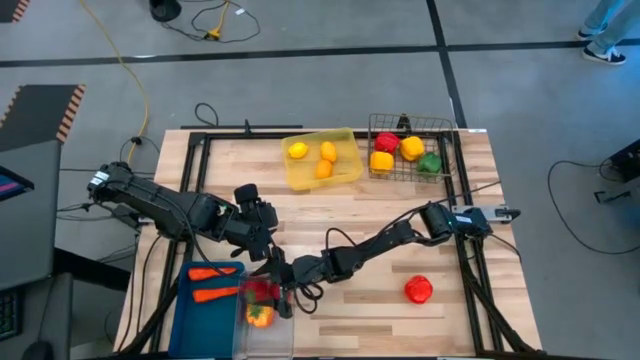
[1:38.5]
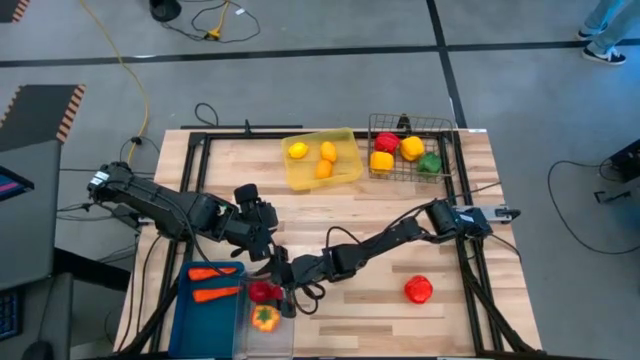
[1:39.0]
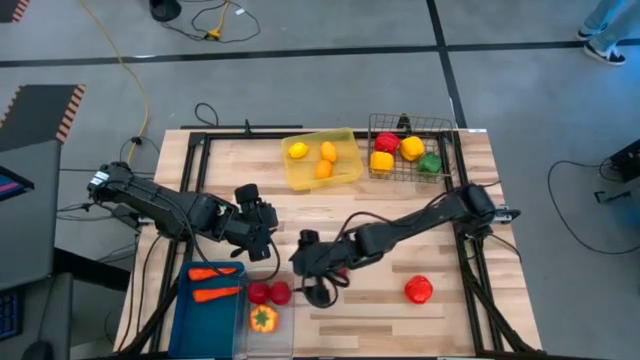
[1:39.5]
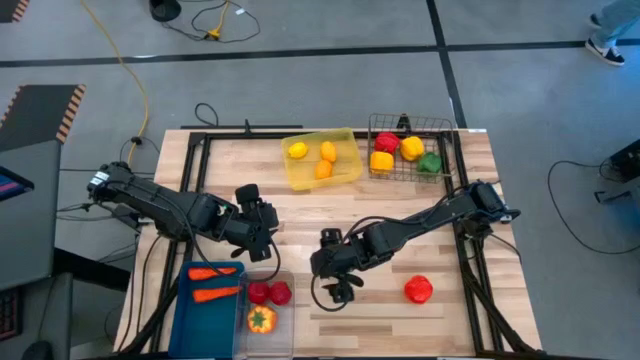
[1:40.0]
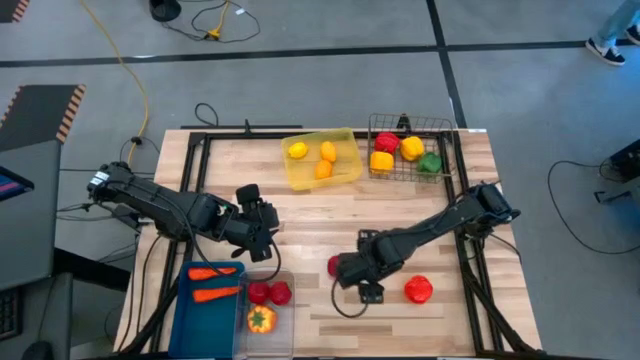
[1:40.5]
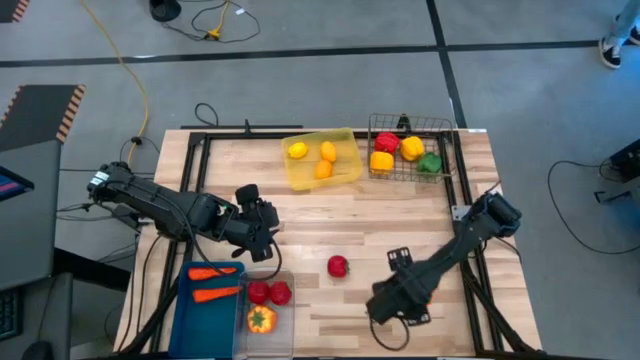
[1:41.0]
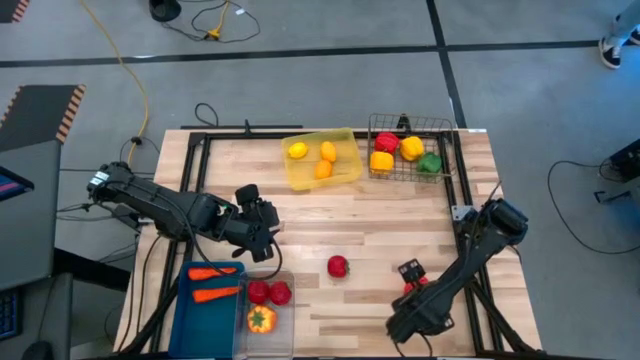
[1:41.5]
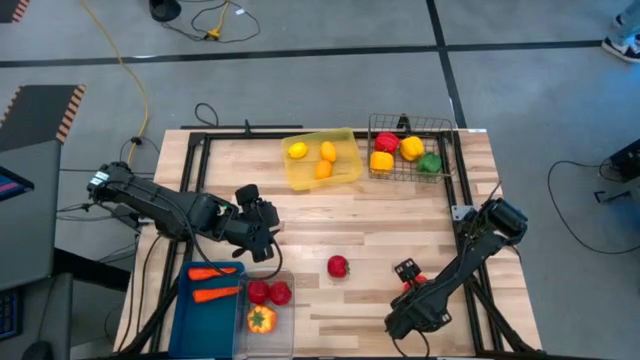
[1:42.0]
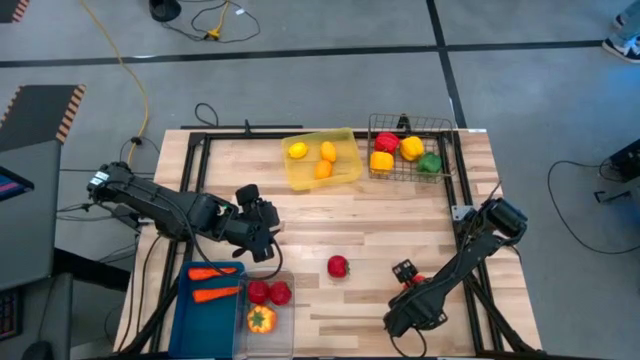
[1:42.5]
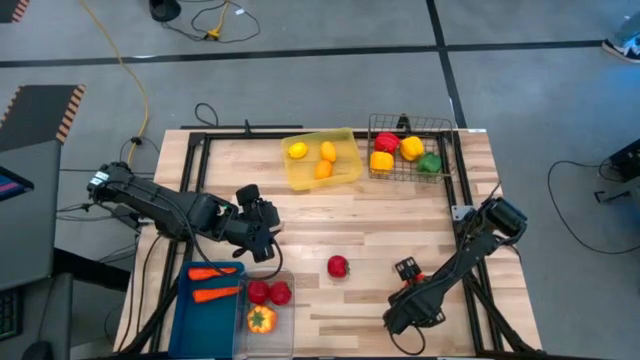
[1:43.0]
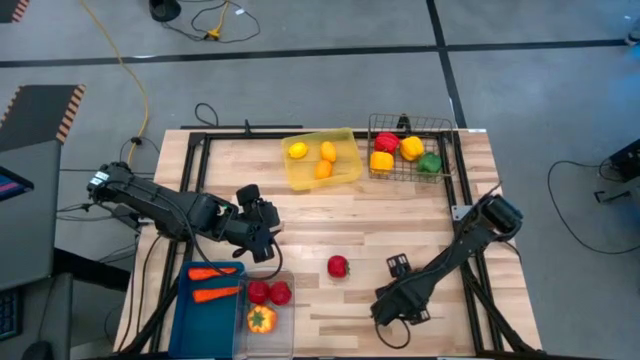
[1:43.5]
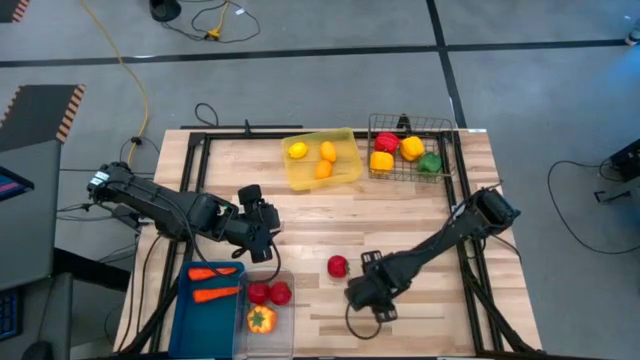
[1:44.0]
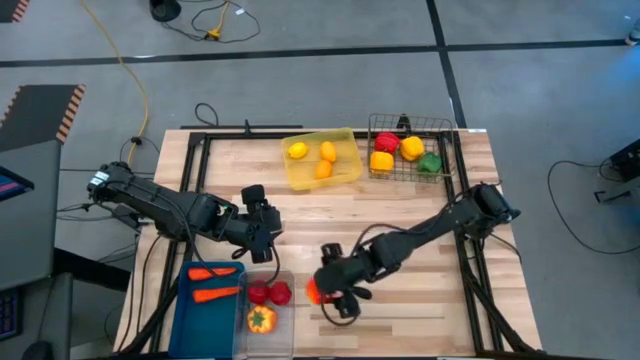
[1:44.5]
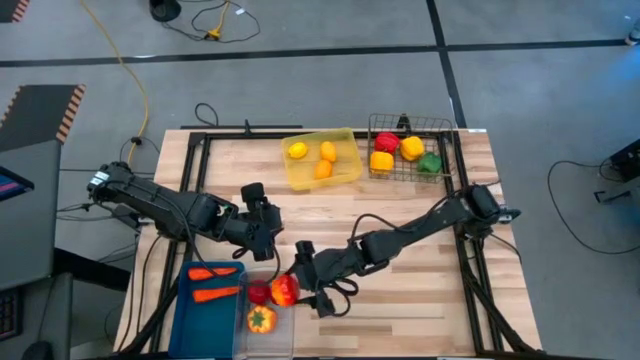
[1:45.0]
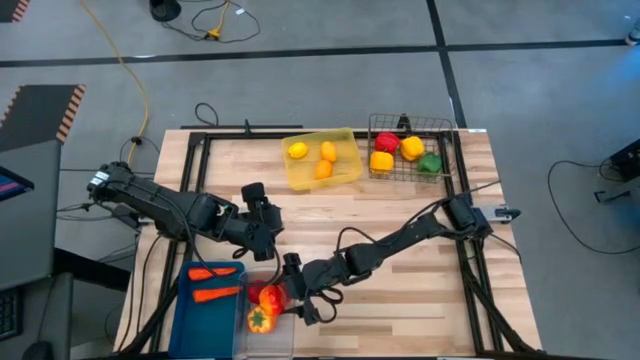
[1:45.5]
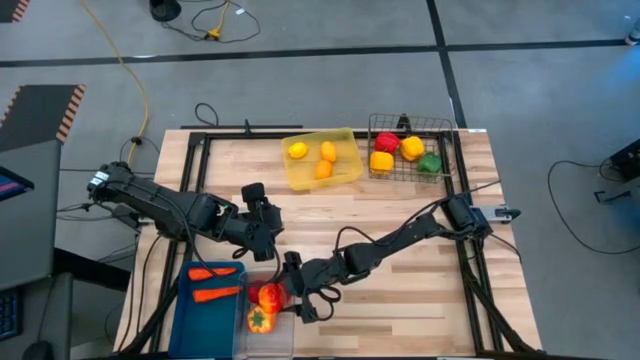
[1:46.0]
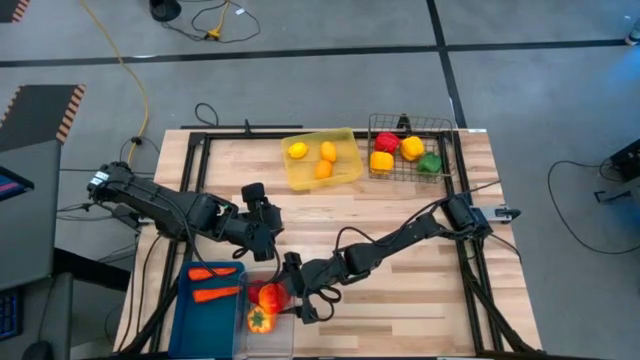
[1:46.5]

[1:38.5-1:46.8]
Task: Sort produce into baskets
Put the orange tomato into the transparent bin

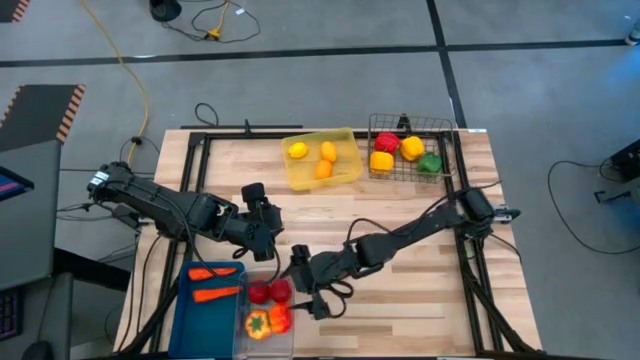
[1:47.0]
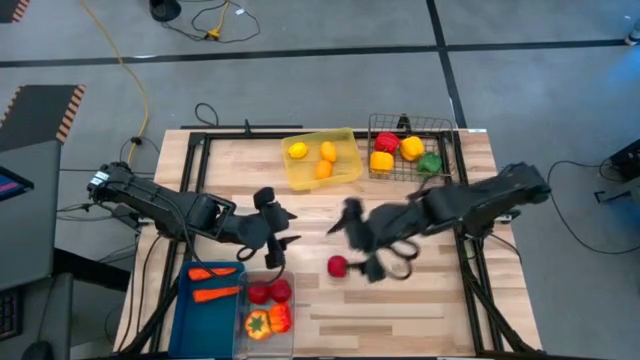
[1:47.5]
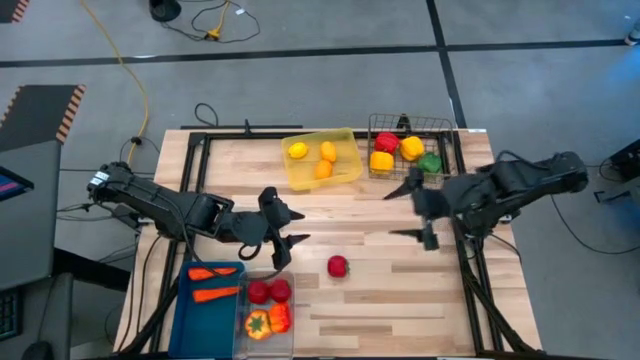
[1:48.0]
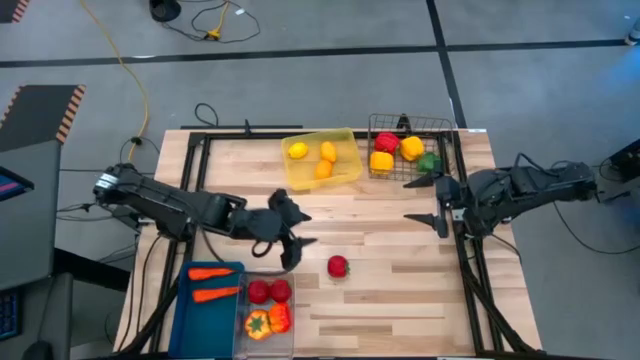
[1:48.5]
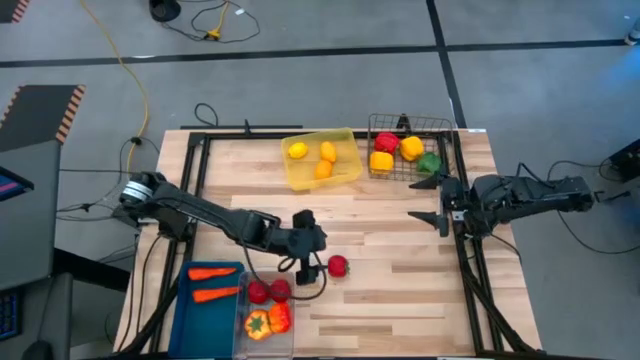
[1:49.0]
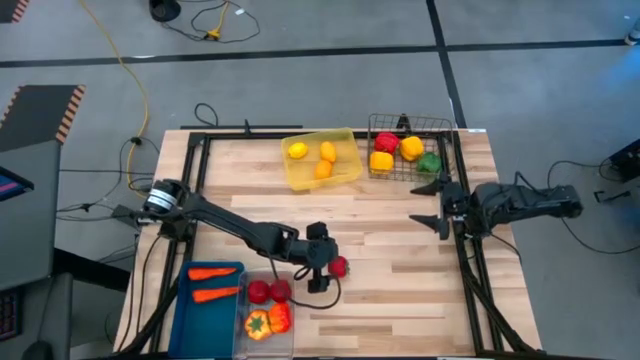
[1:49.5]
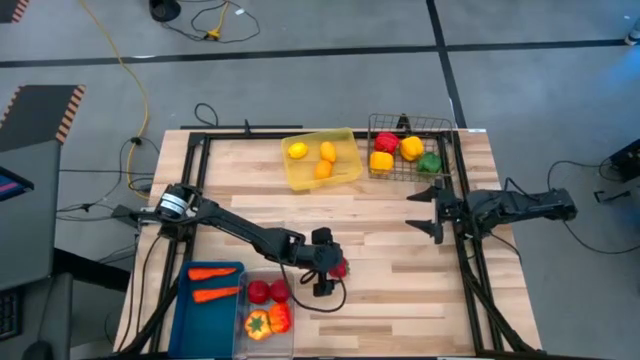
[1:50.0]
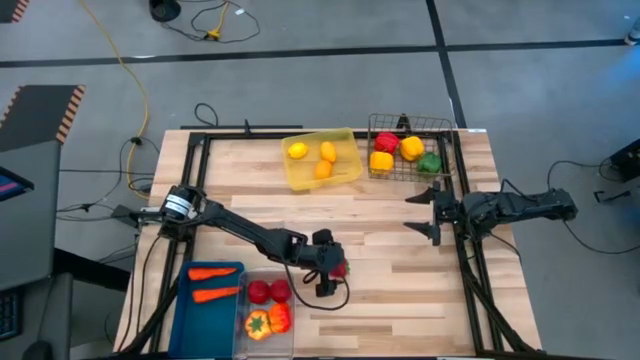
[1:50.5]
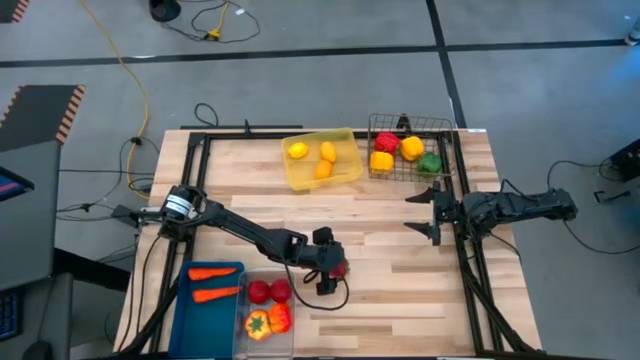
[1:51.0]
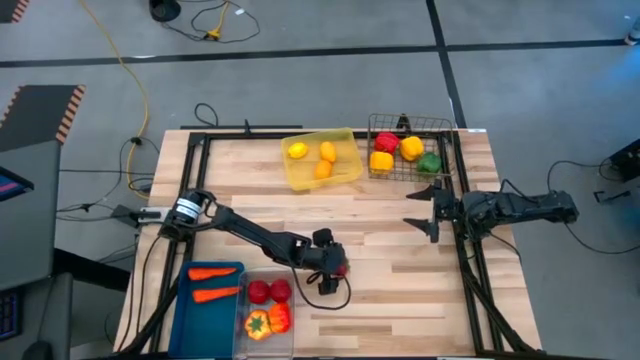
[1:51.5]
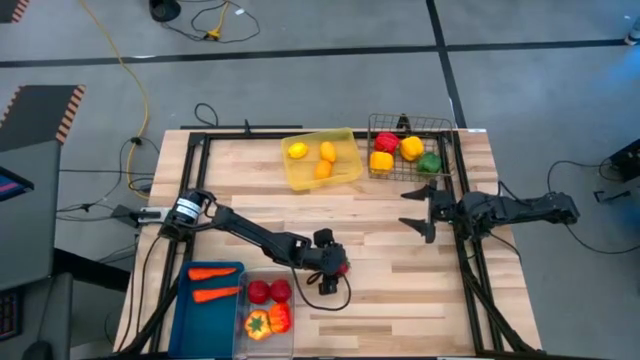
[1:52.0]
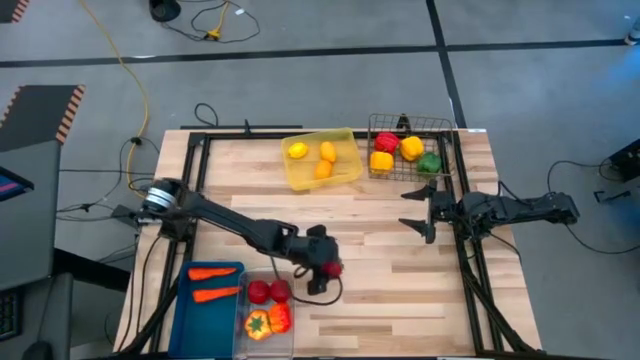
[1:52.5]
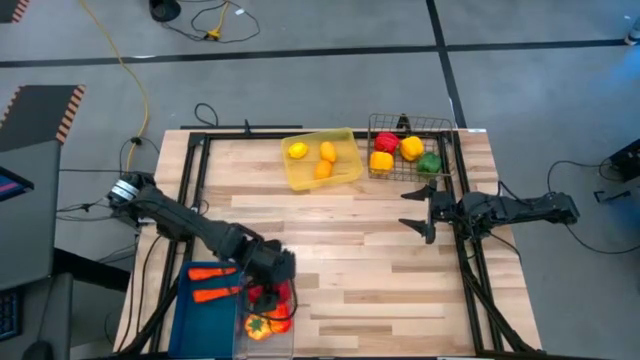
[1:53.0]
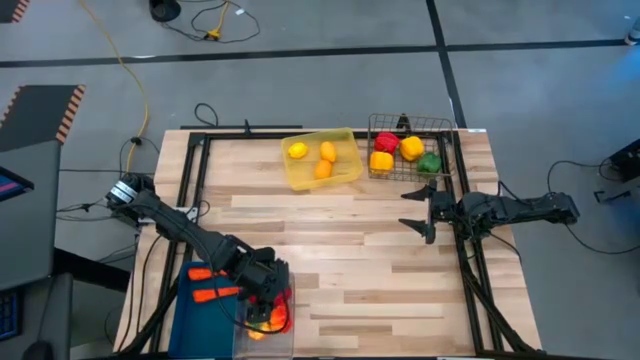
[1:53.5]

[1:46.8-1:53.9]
Put the red tomato into the transparent bin

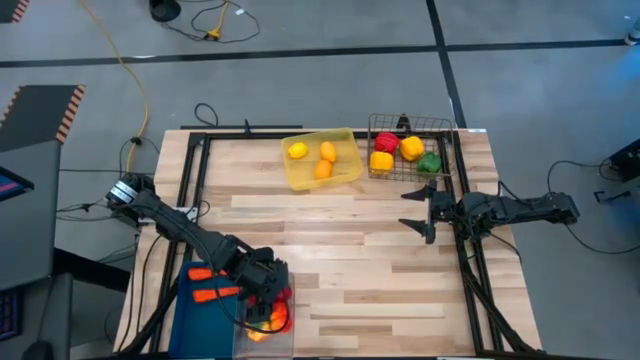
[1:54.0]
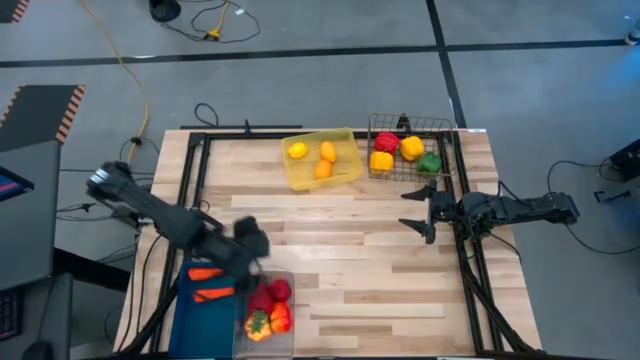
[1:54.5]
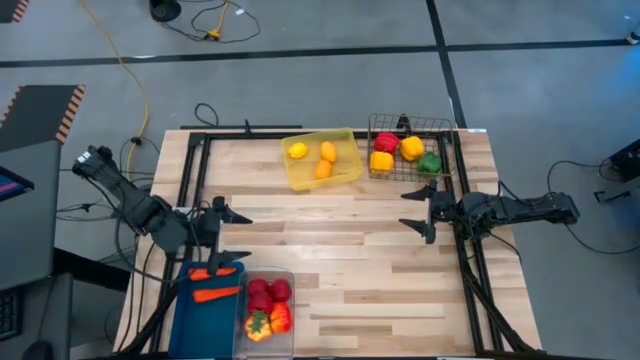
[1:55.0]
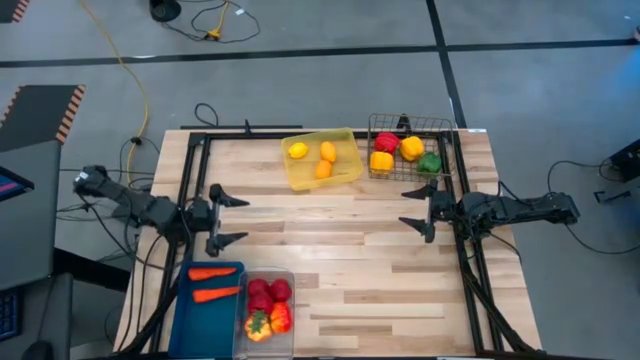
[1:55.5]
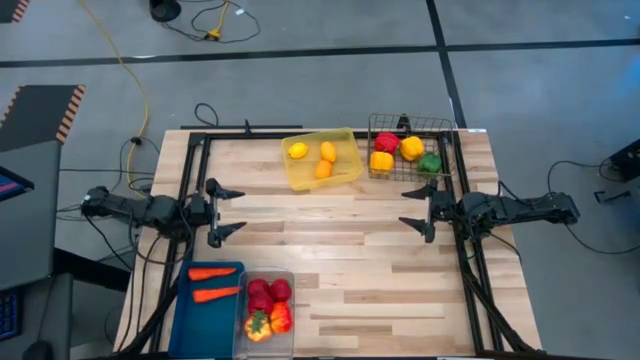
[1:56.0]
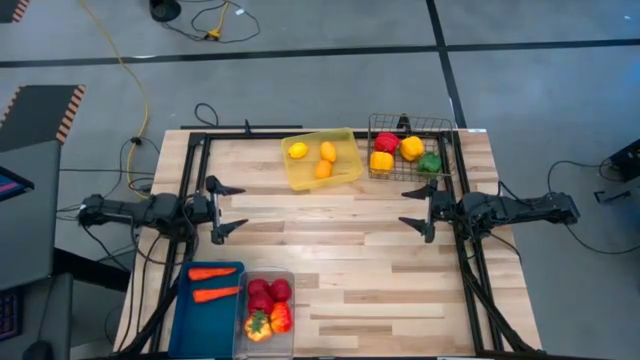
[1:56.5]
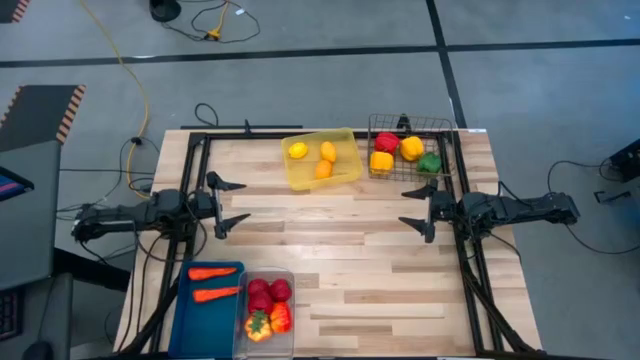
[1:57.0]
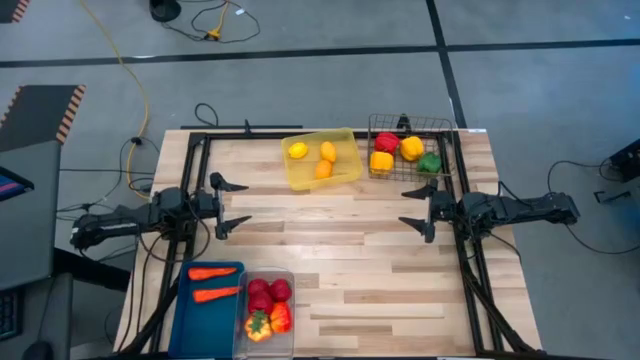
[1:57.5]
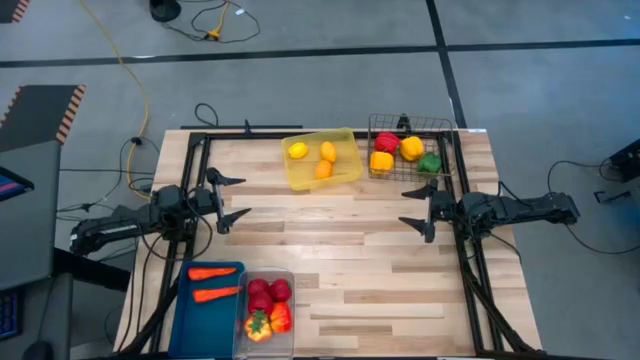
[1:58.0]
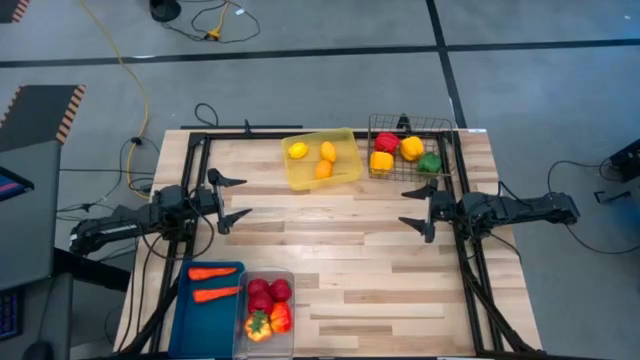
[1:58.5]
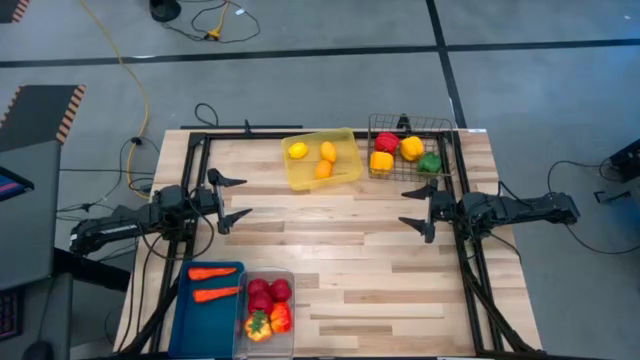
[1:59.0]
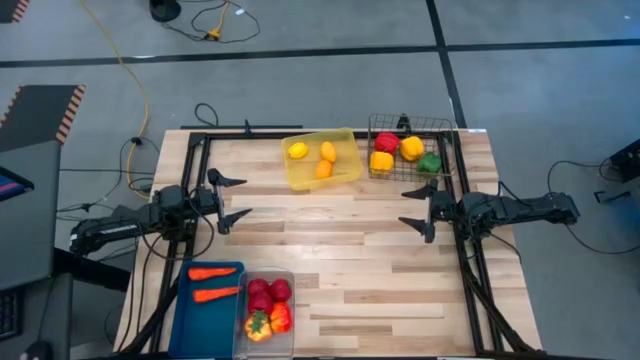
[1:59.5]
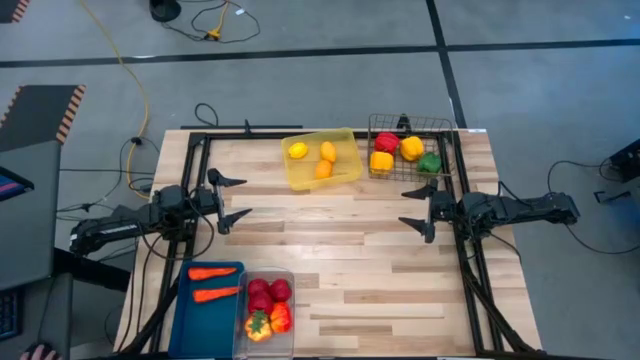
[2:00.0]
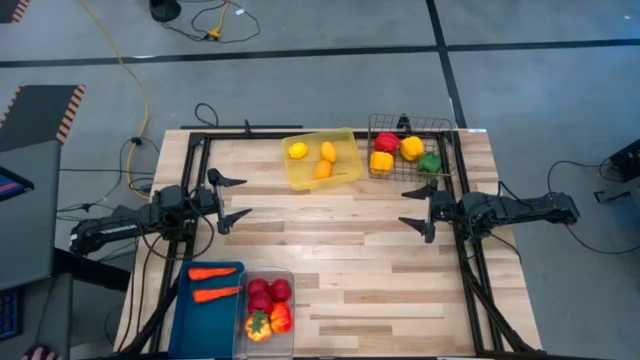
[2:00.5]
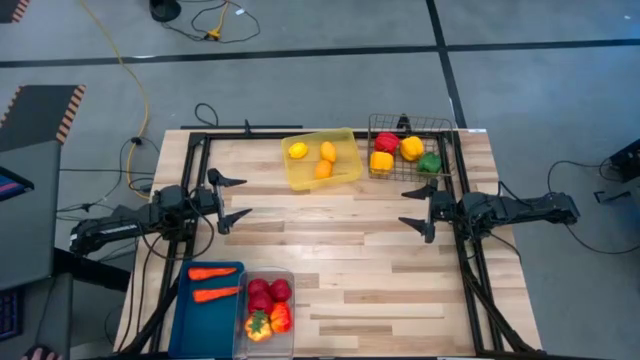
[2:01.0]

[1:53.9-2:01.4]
Return to Home Position
